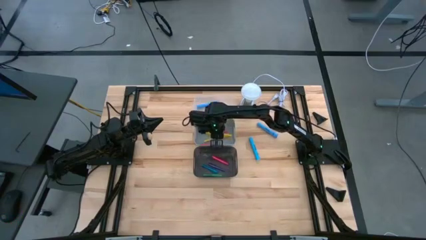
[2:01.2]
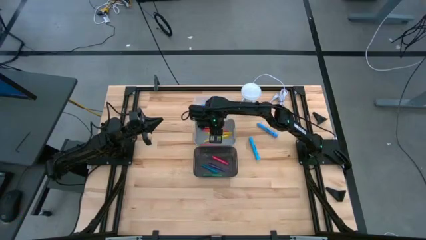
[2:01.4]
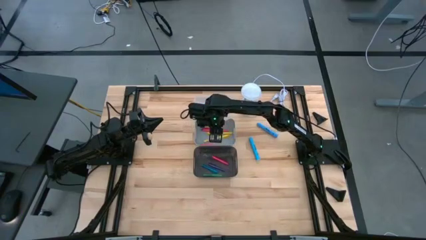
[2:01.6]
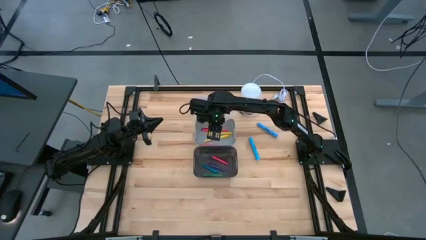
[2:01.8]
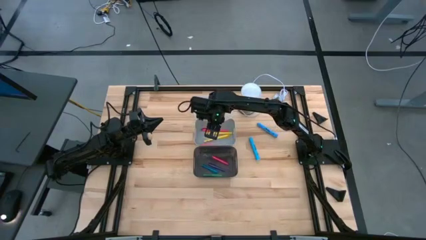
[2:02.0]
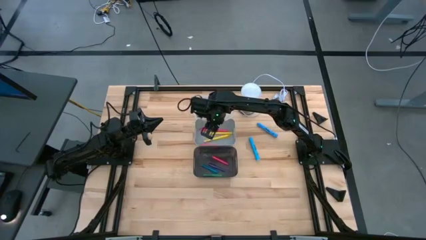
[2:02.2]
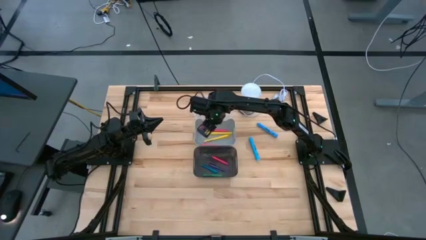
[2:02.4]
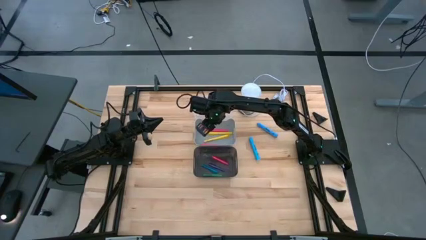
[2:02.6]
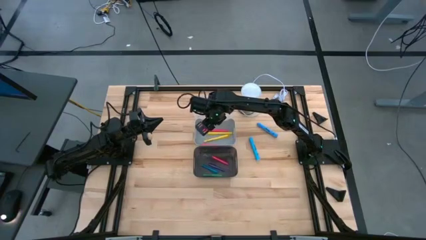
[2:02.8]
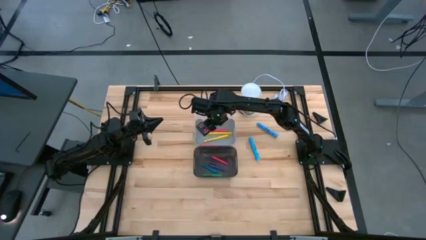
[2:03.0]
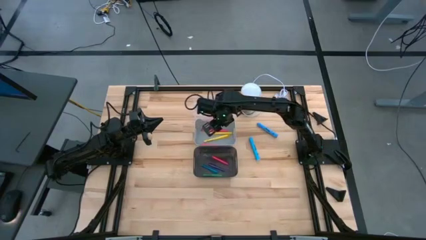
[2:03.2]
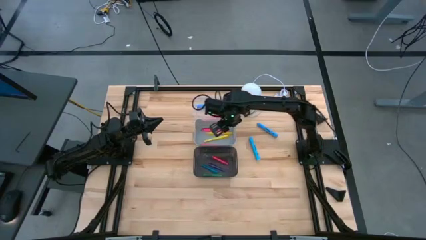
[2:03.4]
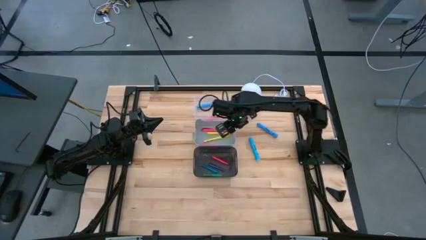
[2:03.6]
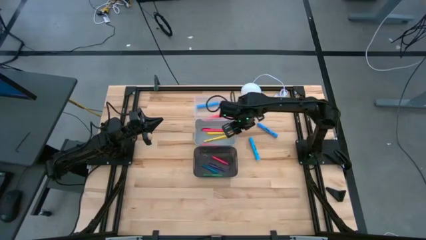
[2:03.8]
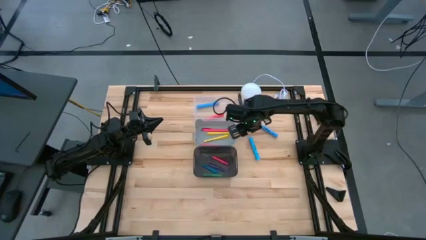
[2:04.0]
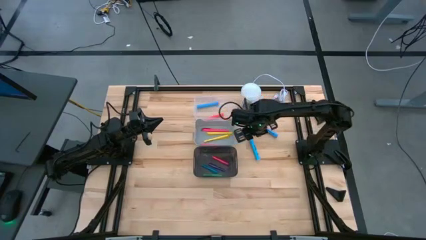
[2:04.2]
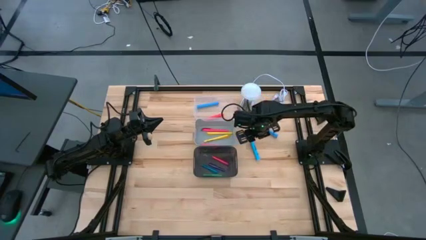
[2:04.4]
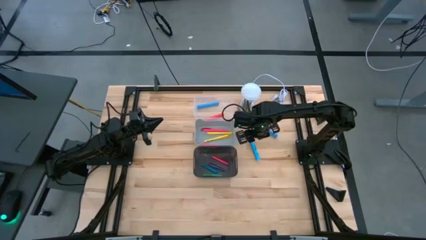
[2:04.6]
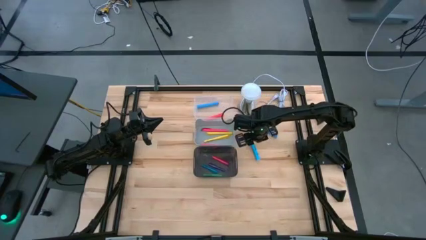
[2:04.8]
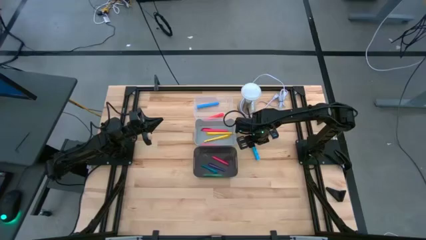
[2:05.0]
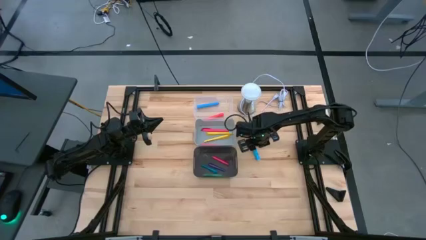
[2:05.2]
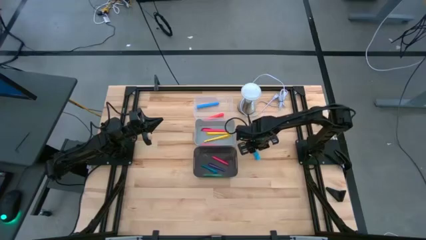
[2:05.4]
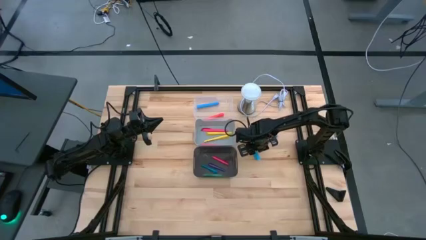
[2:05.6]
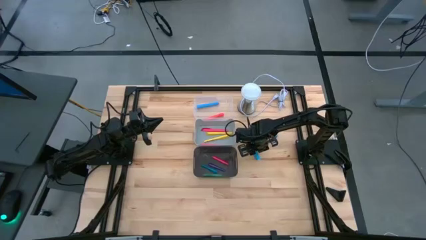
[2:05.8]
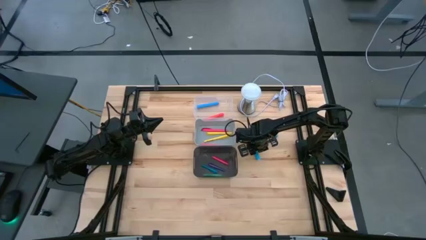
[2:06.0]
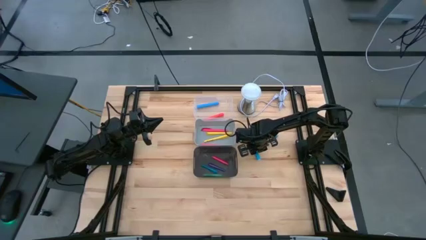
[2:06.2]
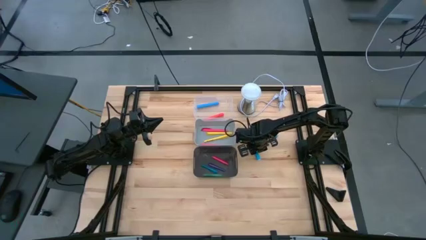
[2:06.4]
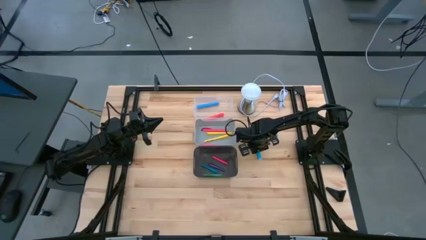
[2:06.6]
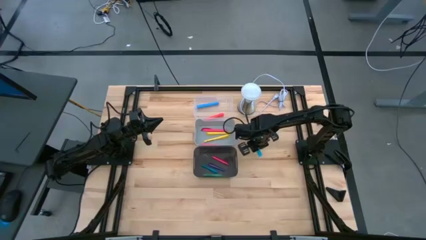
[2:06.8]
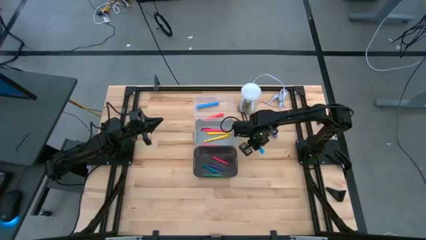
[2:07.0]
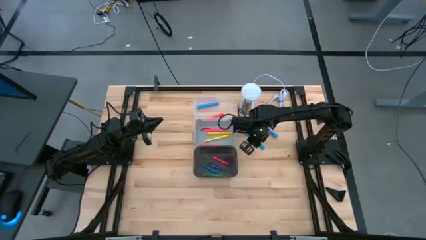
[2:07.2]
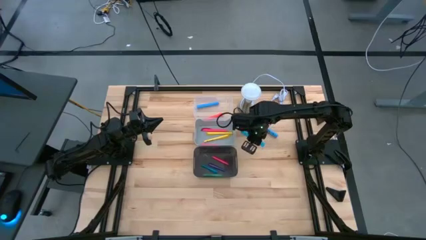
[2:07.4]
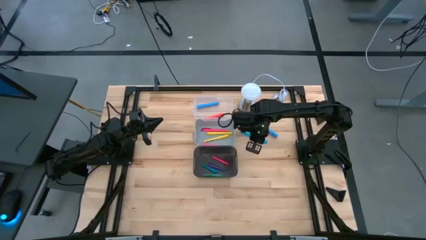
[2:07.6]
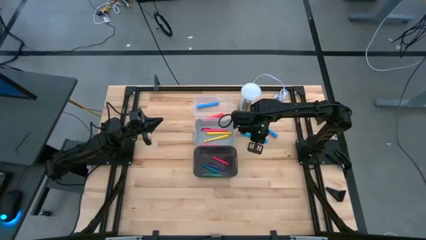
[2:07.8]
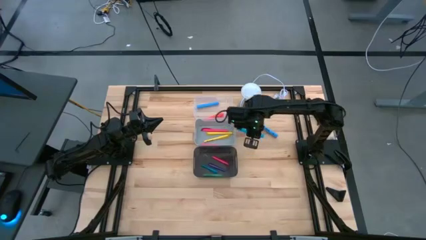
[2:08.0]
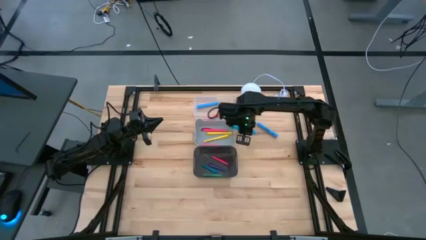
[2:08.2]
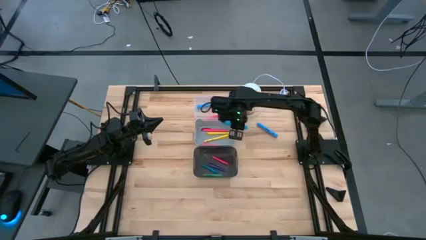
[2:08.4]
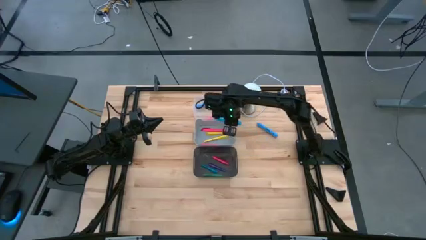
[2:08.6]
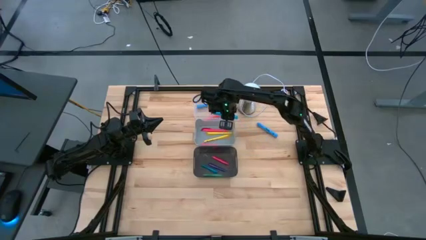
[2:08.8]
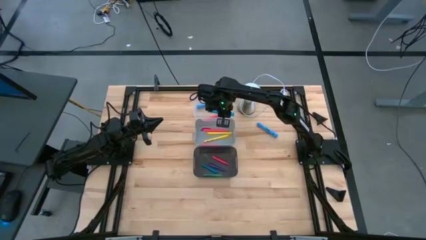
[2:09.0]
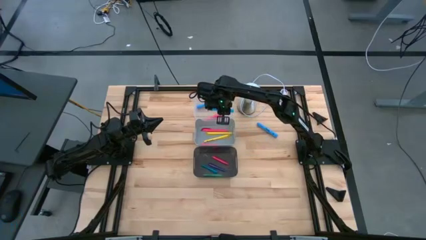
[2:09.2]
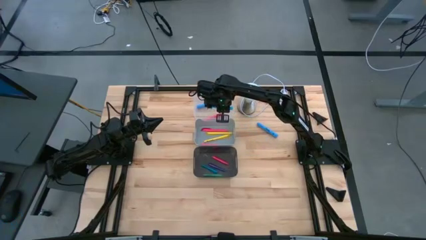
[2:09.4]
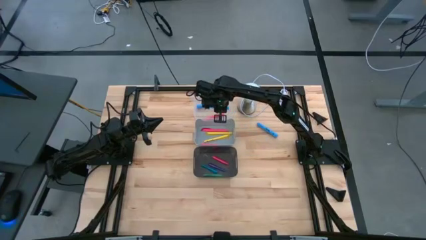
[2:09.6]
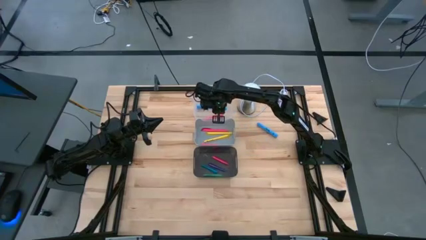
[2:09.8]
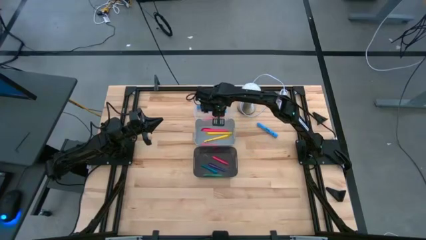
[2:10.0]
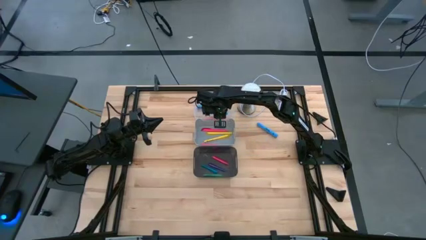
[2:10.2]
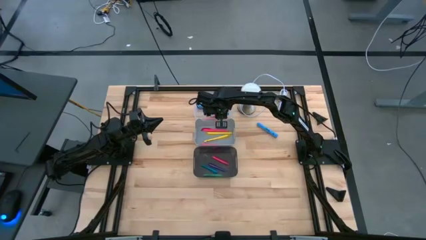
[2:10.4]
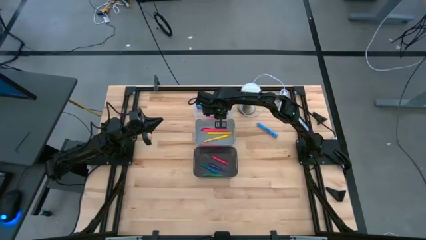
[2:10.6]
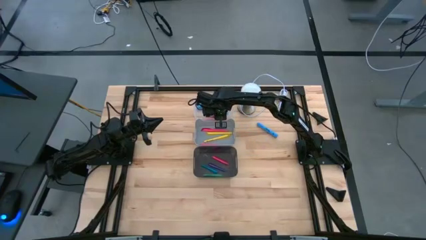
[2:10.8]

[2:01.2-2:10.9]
Task: Pick & Place Markers
Put the blue highlighter into the transparent bin

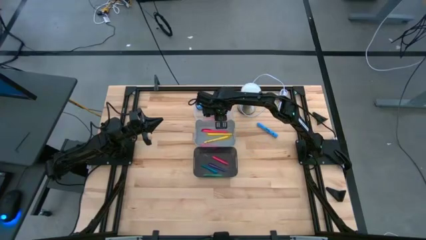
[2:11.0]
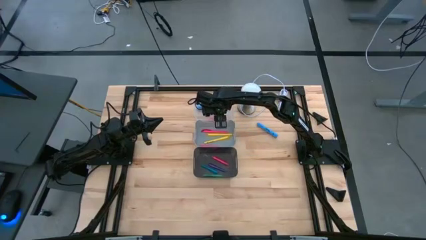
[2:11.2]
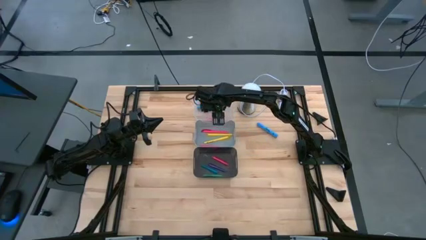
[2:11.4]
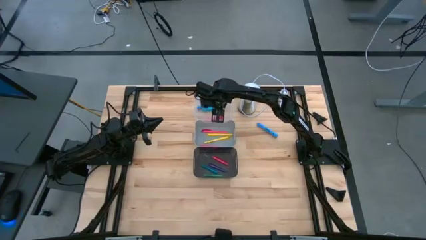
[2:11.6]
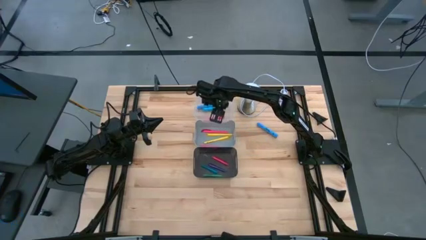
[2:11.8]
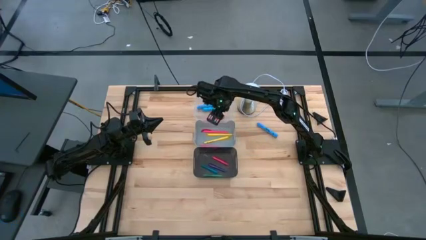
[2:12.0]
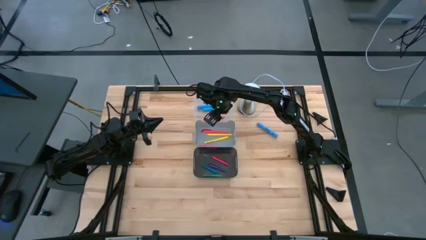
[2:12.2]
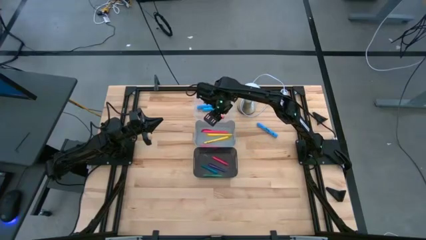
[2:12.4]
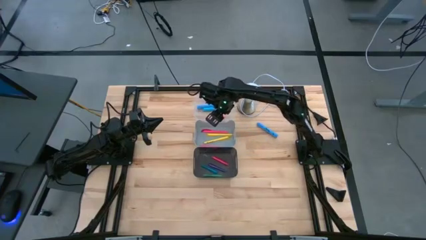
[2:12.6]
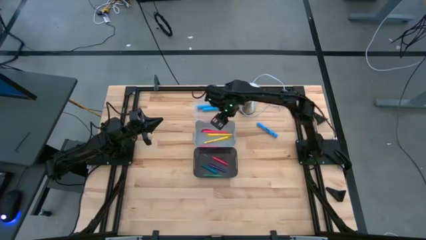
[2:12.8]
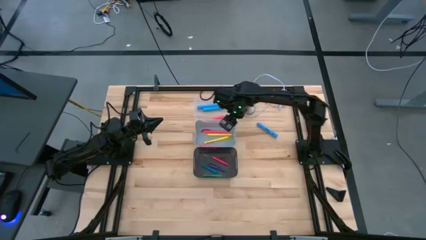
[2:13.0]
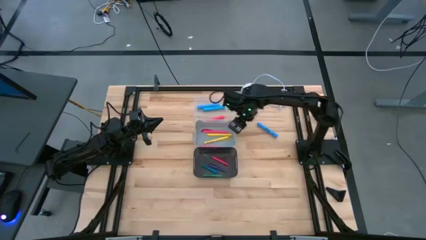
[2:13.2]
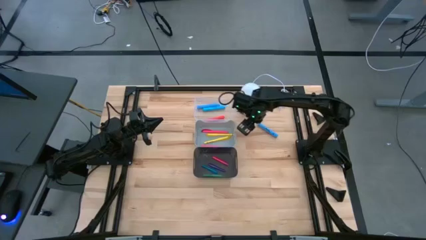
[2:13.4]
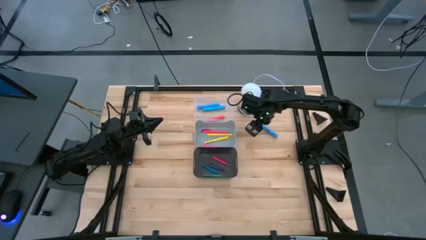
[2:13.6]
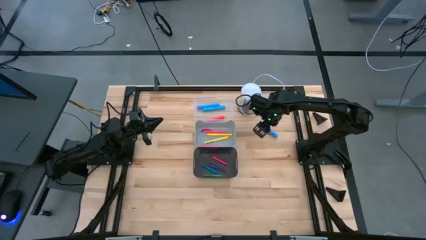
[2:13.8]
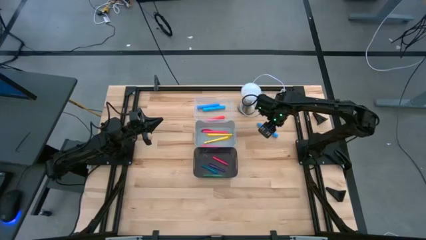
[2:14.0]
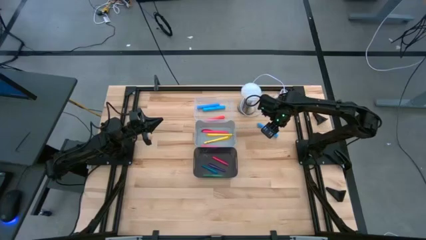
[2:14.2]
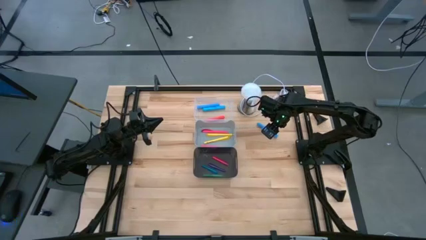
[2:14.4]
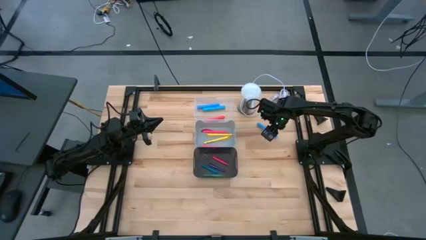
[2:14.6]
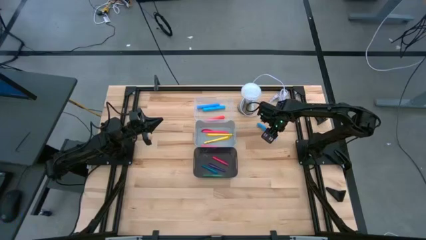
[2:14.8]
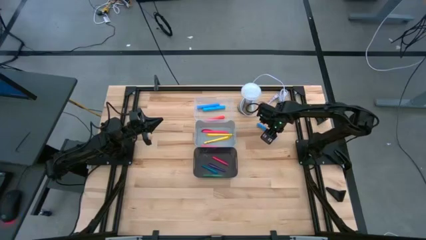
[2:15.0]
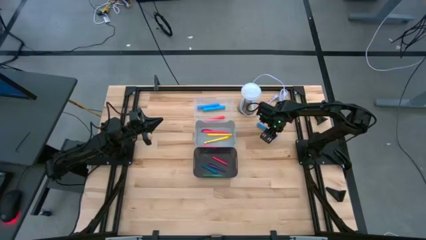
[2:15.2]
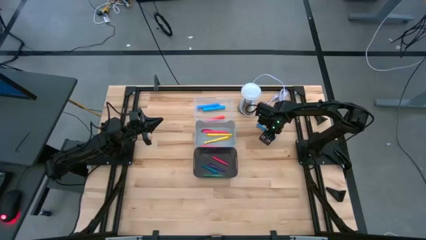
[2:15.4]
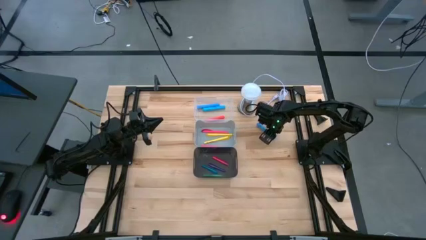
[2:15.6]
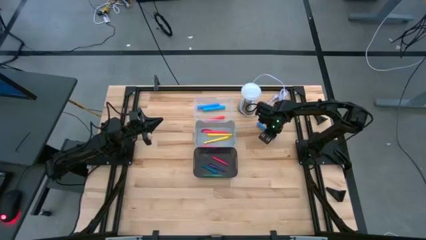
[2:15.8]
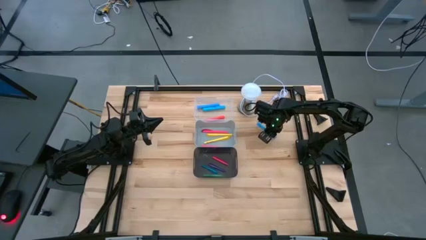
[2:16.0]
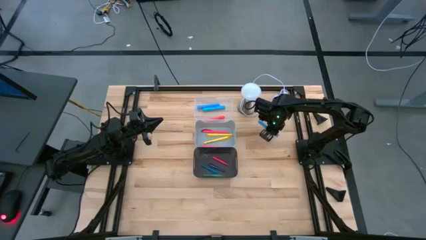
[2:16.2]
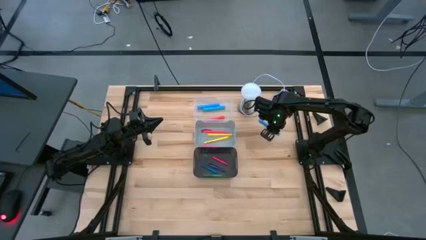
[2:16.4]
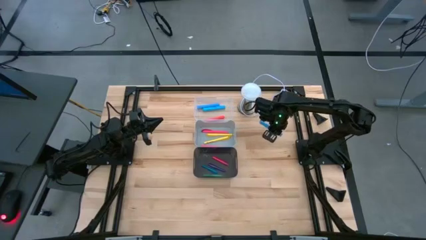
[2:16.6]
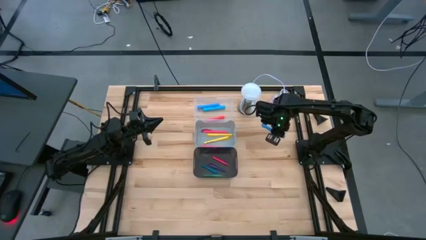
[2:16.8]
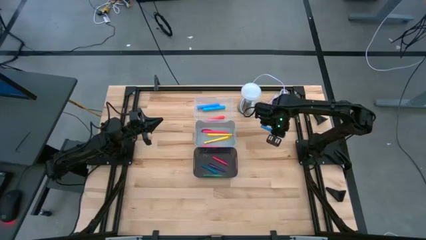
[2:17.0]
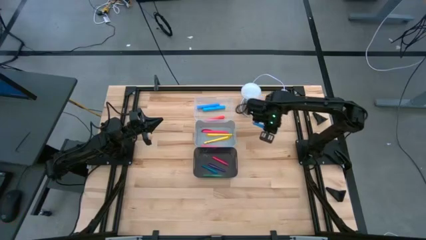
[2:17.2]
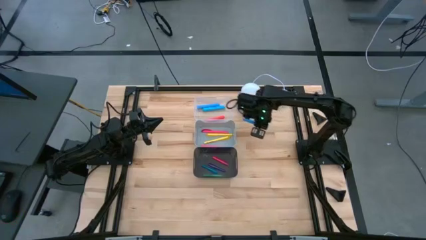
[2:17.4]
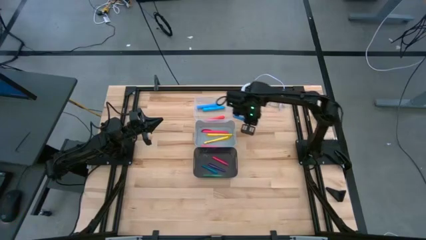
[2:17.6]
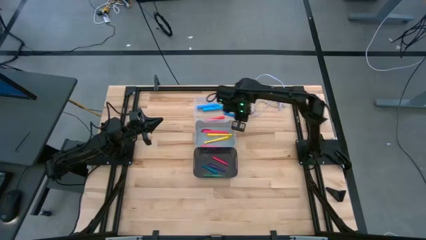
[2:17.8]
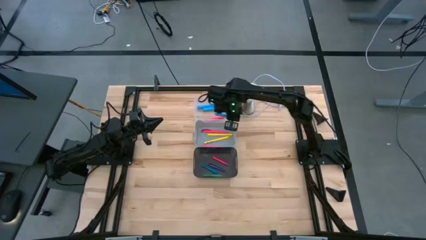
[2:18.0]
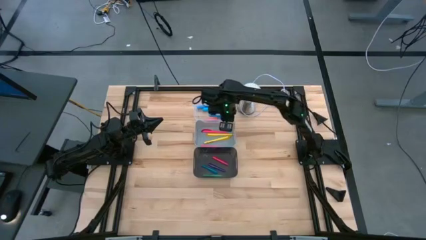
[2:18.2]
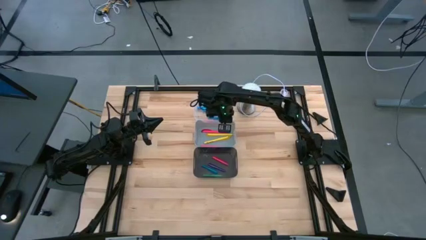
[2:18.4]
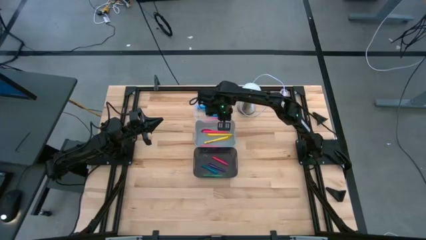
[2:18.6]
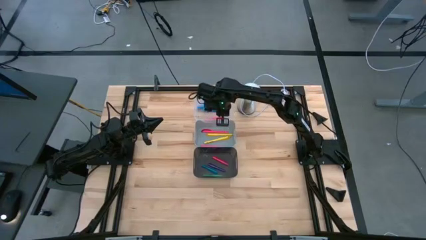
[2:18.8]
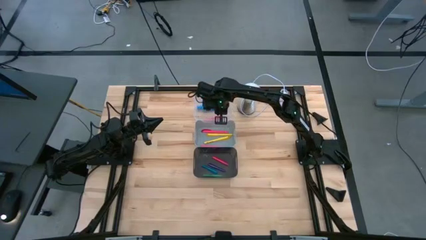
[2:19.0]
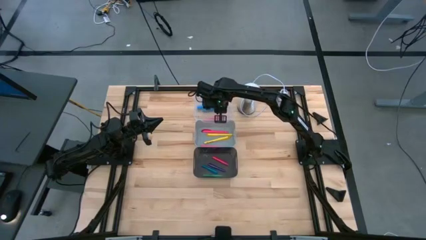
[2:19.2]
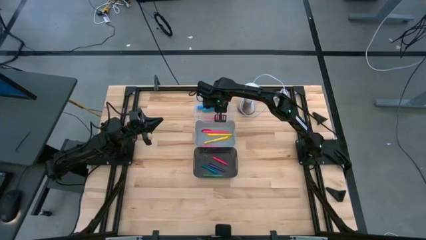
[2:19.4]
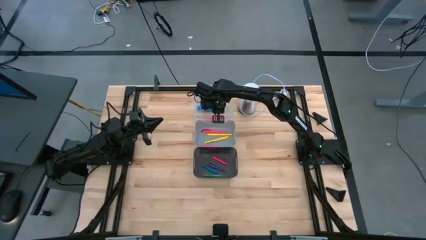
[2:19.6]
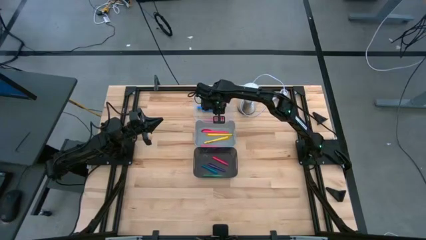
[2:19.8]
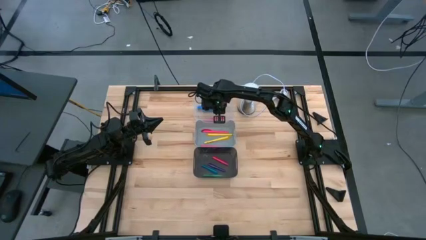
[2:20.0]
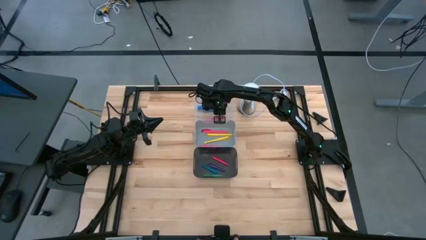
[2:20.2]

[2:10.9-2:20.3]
Put the blue highlighter into the transparent bin
